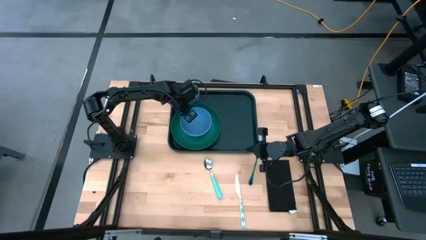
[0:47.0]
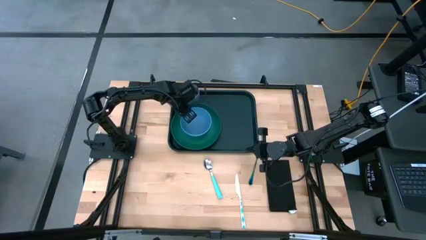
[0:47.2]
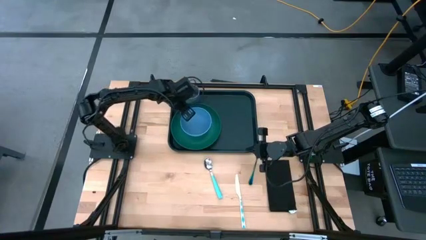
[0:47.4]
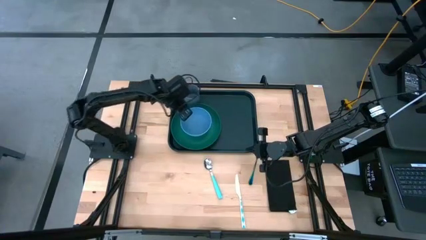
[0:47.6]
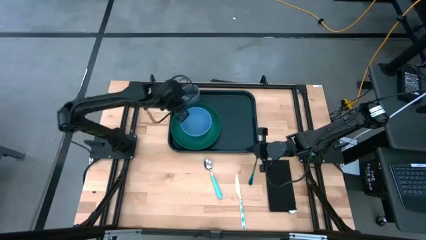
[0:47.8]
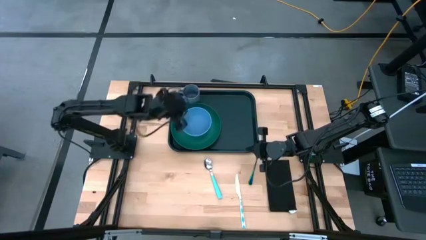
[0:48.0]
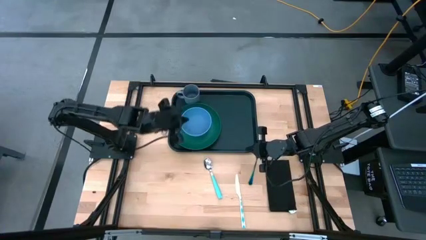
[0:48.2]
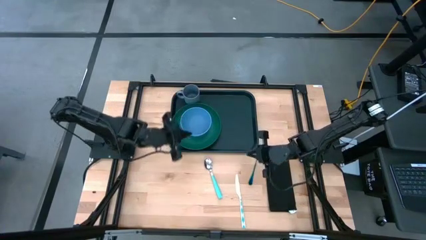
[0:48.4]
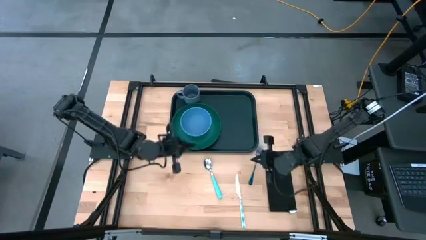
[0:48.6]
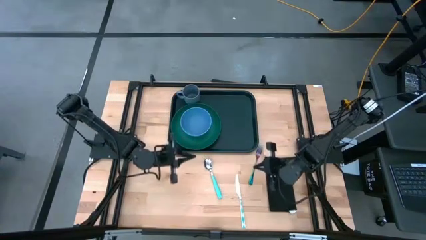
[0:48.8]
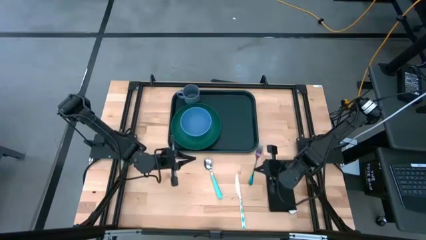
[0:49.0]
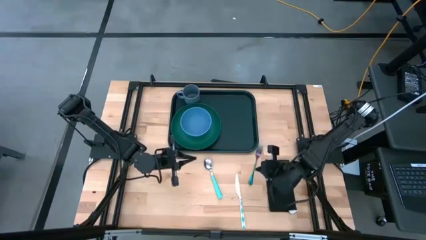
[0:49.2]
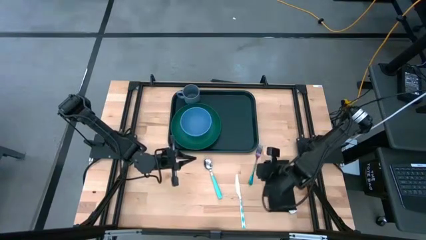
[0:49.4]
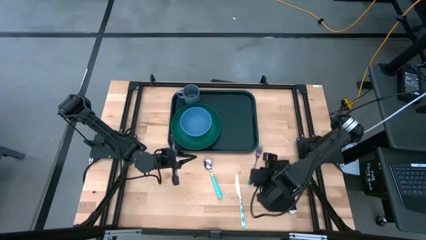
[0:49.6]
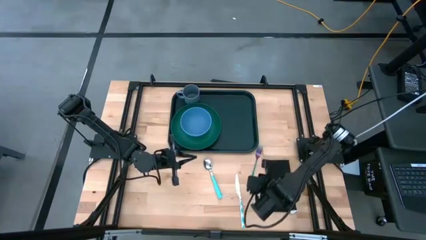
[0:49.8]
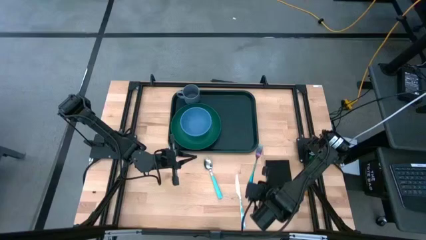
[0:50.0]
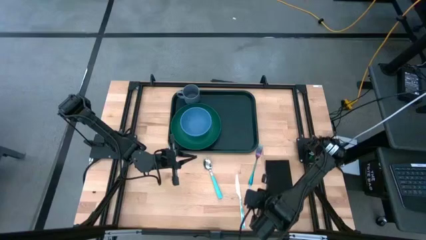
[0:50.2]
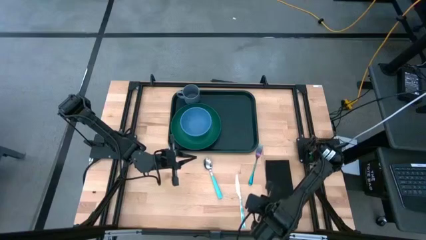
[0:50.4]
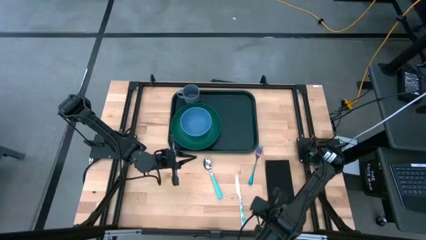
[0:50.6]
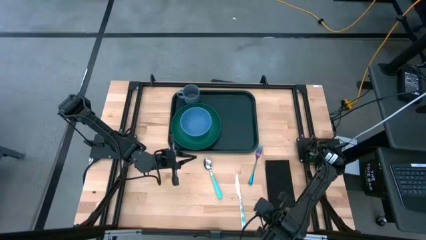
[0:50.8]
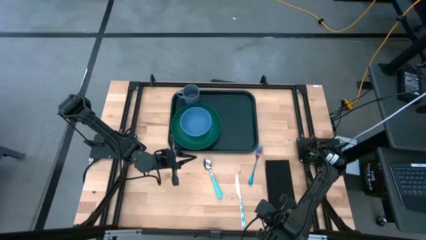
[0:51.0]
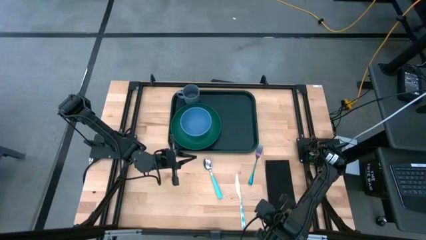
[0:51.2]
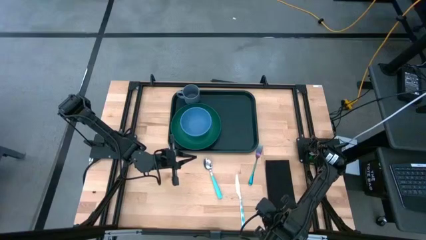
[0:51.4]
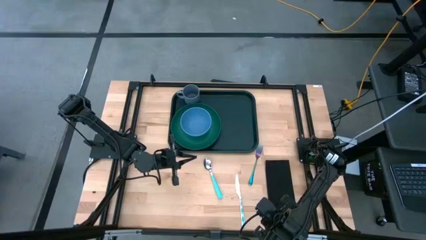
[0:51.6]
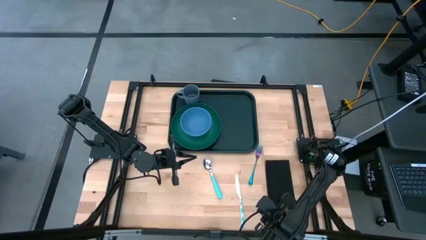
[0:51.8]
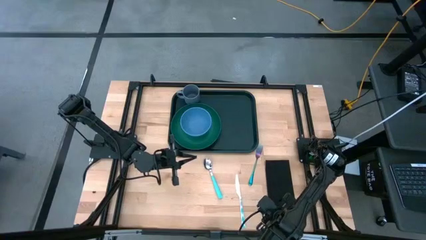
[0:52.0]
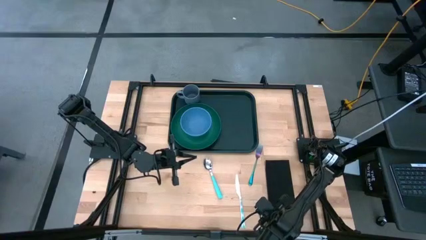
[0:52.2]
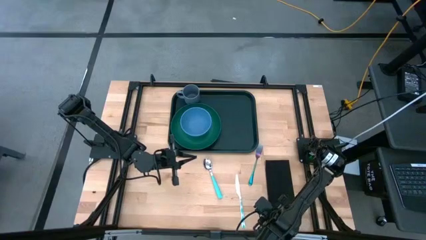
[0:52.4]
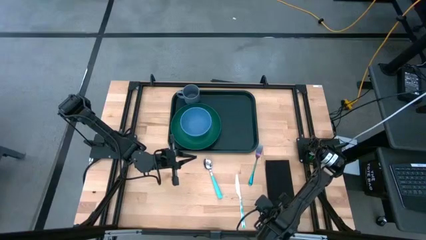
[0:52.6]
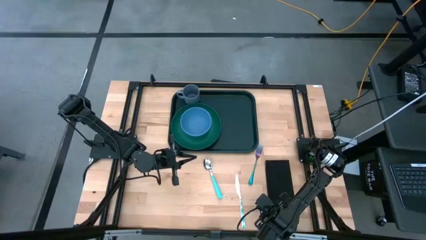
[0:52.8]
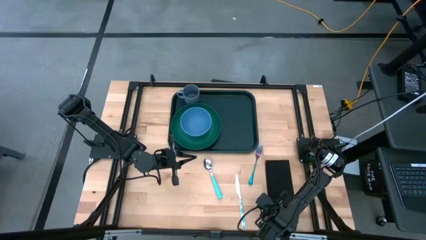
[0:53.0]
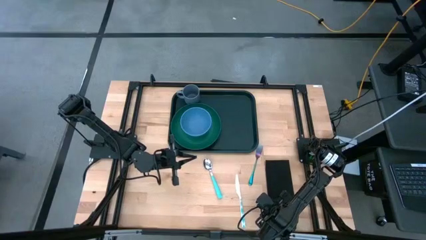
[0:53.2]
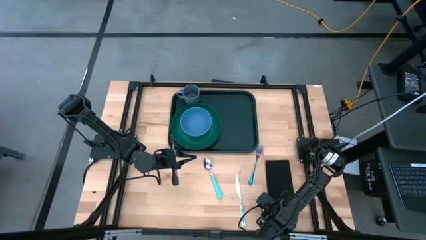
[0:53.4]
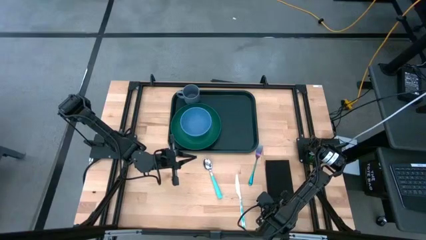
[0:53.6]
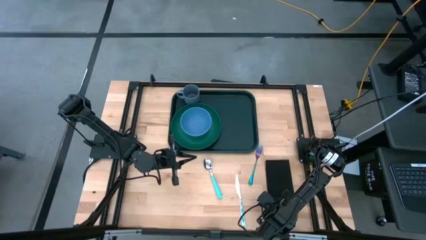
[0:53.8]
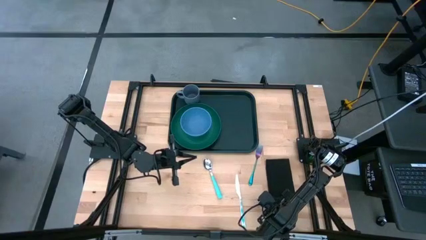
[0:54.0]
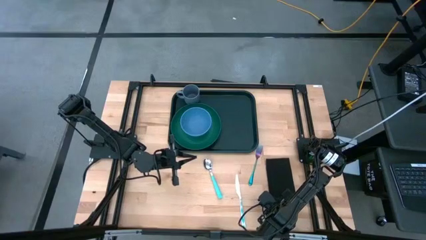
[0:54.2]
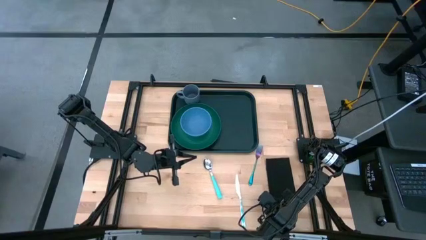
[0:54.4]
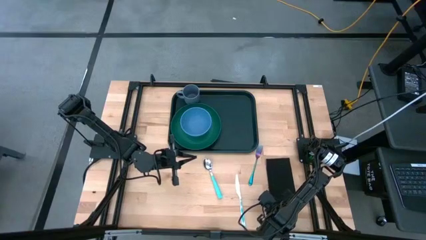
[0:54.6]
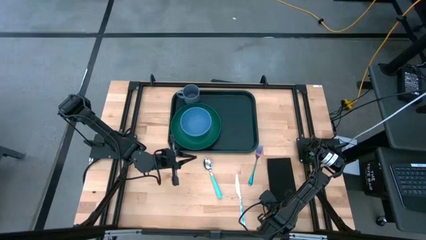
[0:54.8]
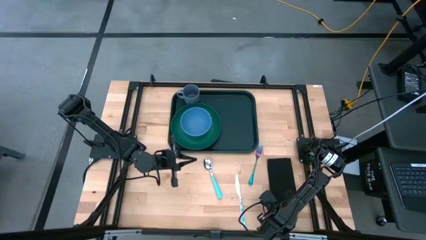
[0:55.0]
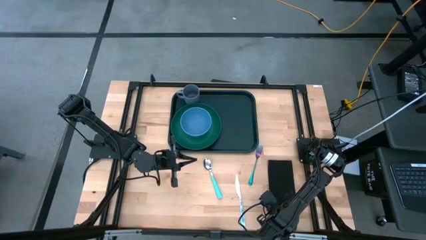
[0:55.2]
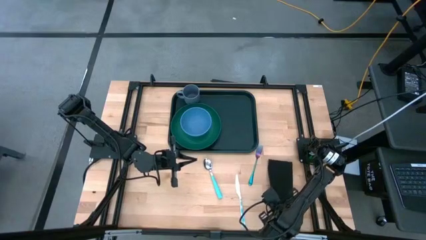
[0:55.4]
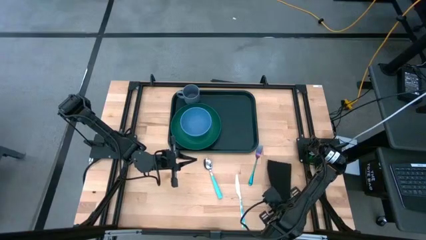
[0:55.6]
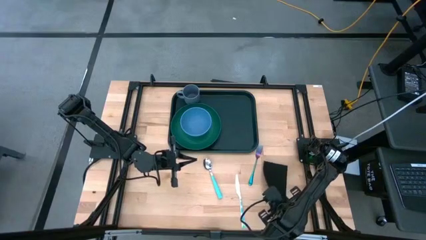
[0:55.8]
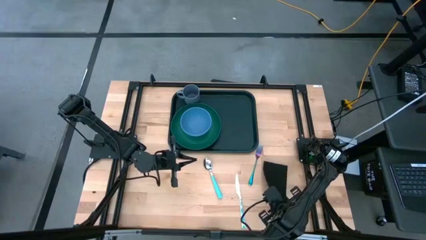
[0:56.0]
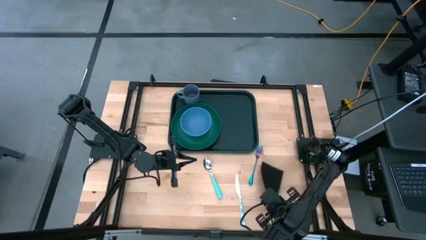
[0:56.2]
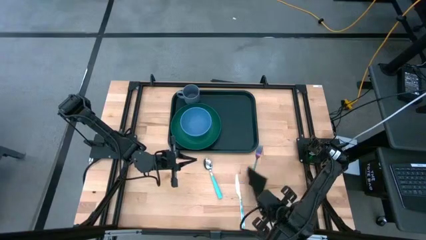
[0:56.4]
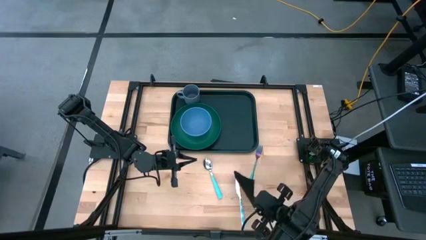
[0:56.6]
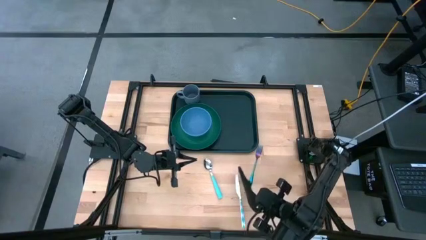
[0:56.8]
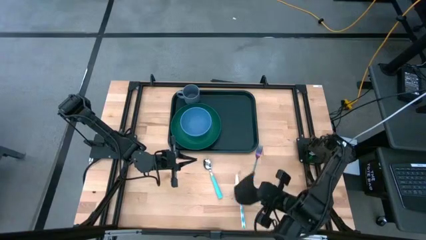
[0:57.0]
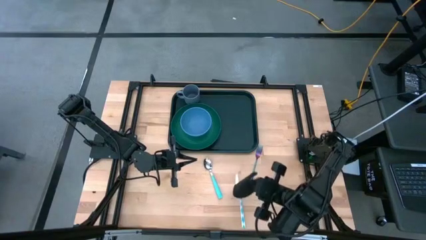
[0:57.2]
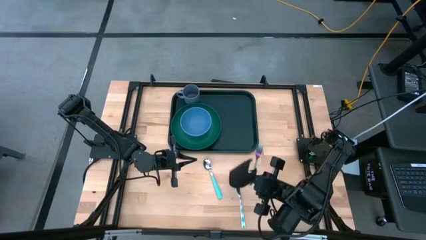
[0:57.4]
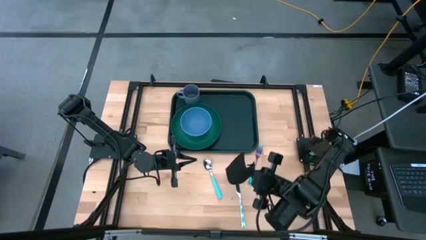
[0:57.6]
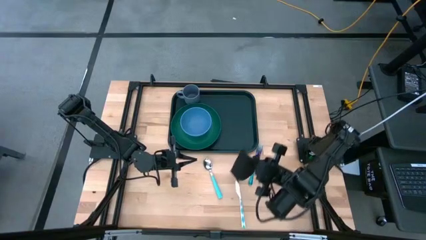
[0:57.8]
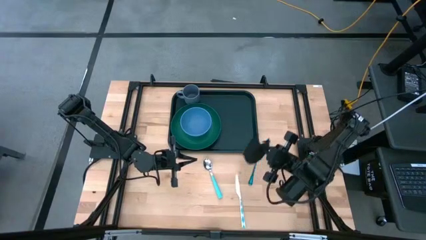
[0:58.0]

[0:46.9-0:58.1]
Task: Set up tray
Put the black napkin to the right of the green plate on the black serving tray

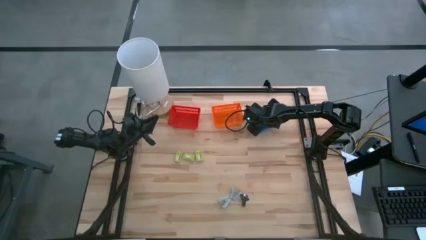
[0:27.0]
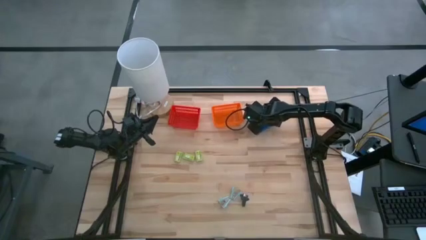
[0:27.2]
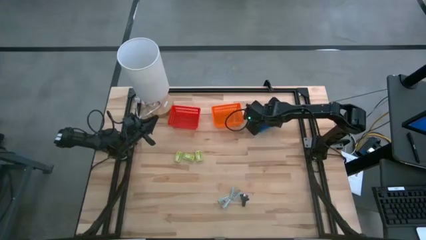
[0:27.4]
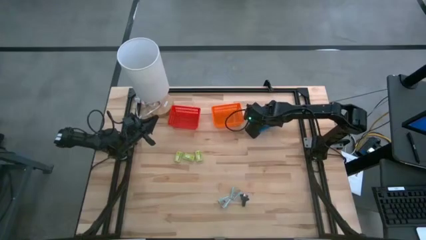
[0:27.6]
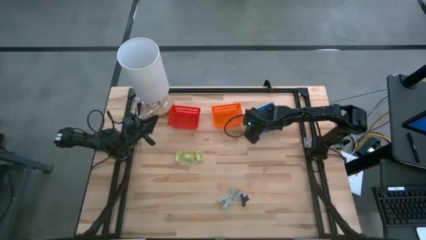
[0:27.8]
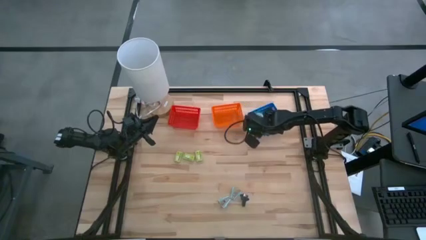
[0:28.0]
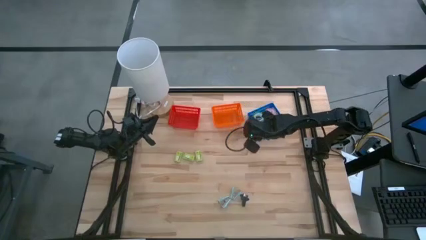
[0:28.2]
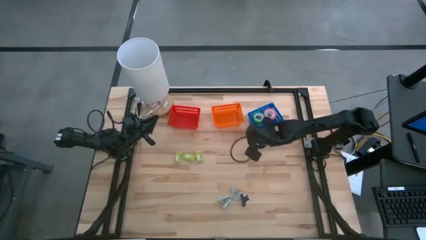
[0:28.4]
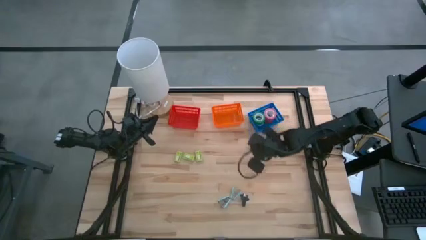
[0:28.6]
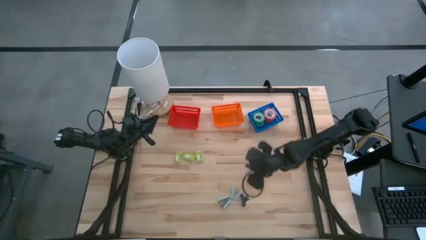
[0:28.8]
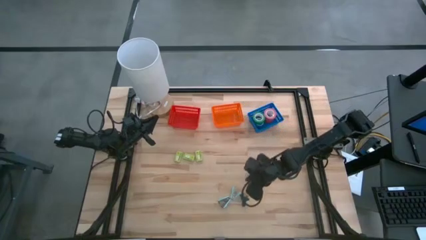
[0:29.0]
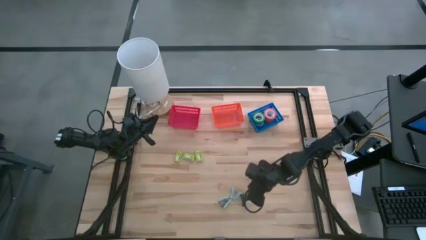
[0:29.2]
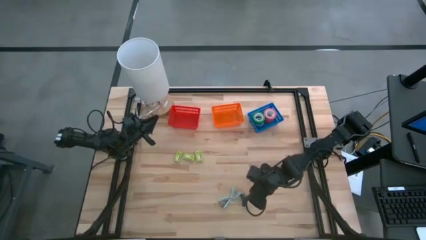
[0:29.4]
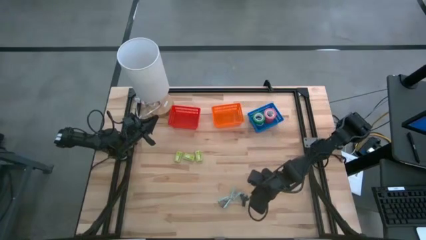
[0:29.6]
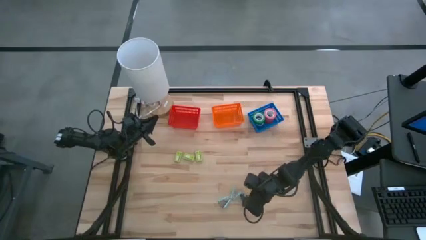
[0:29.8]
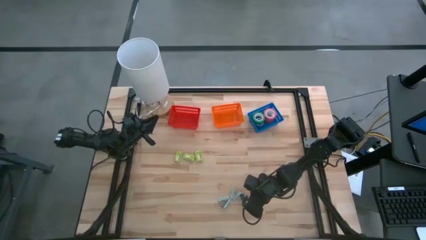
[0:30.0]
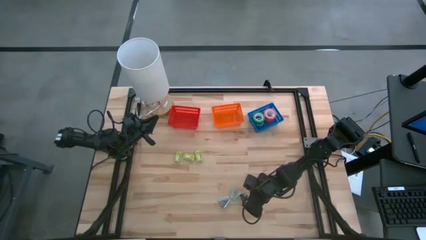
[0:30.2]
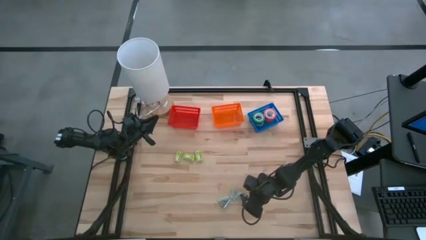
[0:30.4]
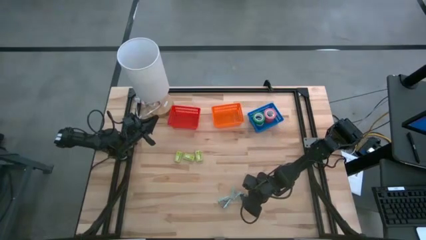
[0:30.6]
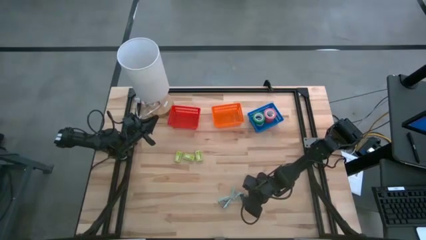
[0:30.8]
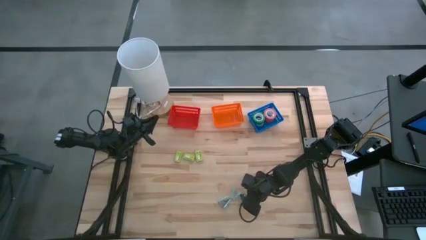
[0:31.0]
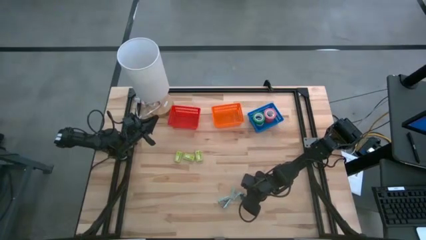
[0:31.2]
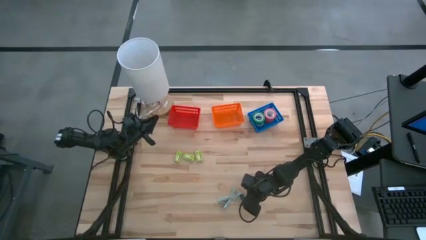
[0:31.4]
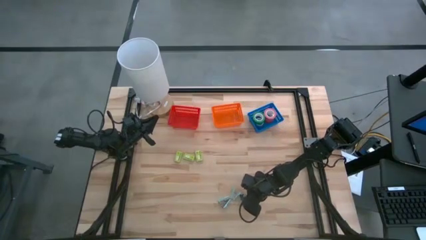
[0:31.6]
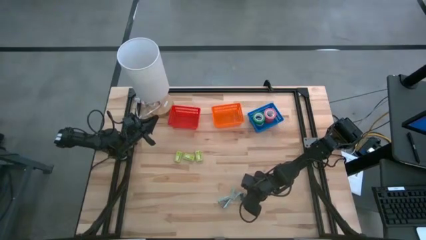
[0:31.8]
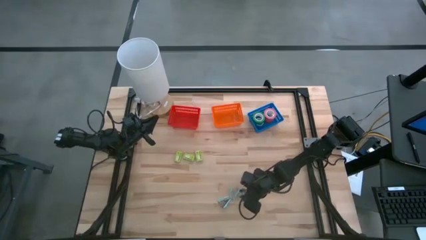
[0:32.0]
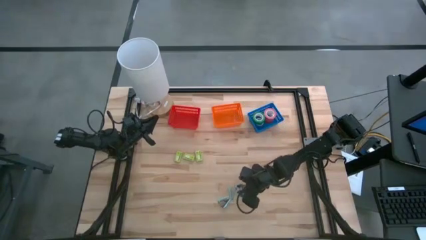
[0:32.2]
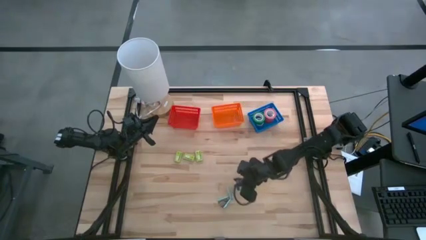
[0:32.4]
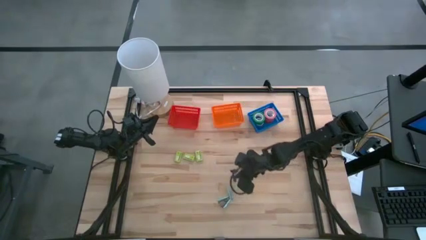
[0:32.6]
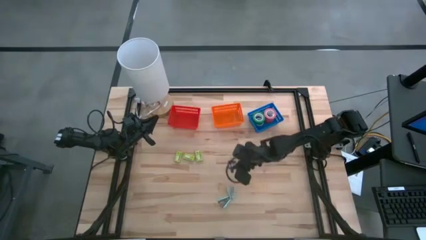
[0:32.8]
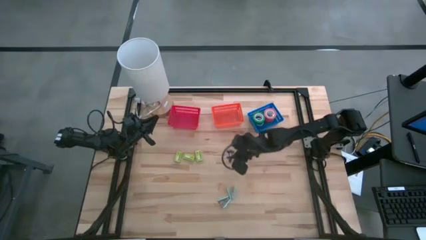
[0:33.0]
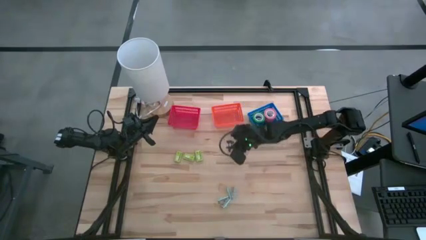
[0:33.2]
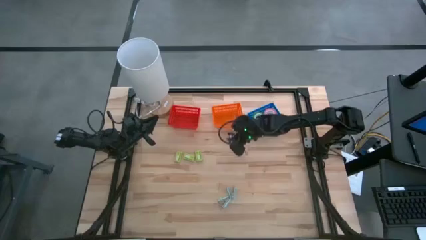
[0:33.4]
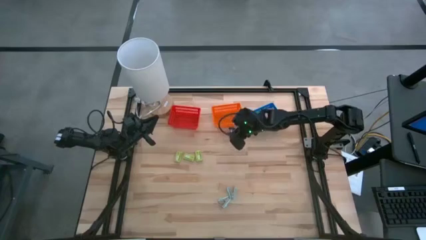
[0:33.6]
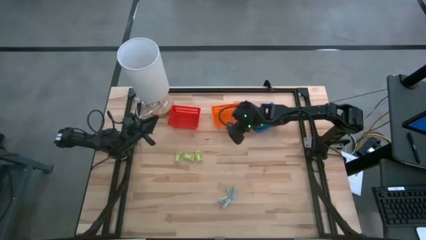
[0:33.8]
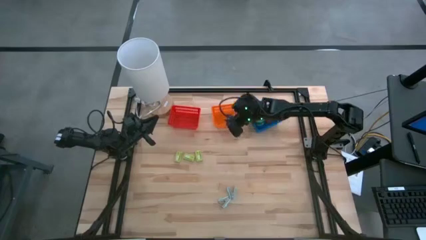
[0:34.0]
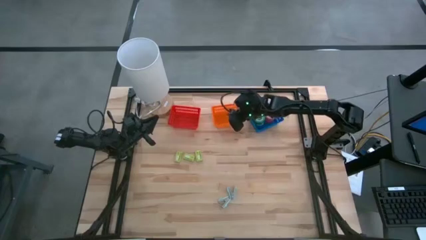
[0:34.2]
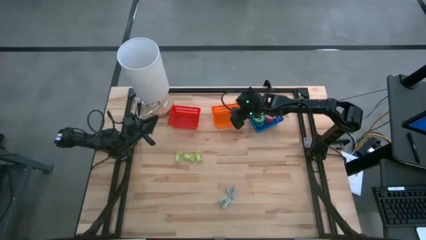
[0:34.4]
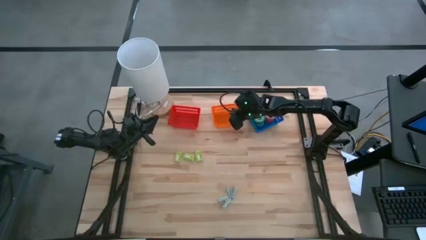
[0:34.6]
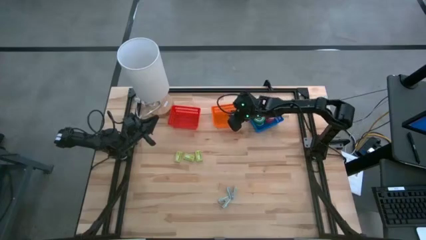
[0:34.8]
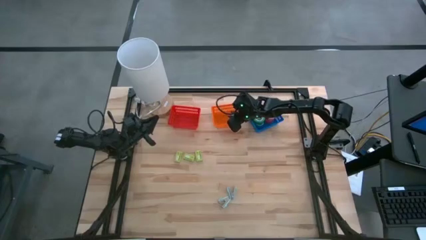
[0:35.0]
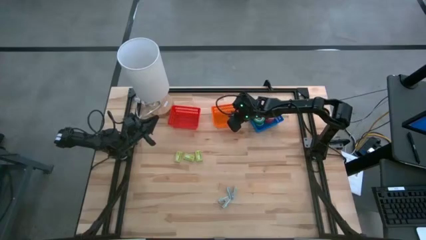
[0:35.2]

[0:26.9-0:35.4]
Task: Pick and place Stapler, Stapler remover, tape
Put the black staple remover into the orange bin
